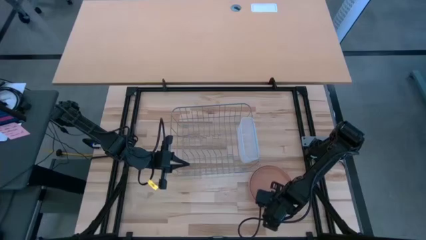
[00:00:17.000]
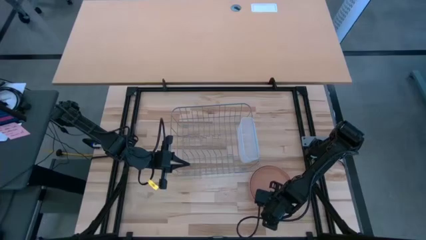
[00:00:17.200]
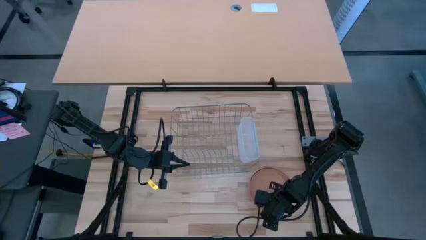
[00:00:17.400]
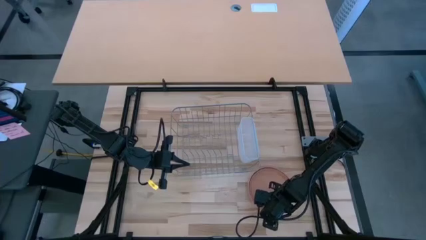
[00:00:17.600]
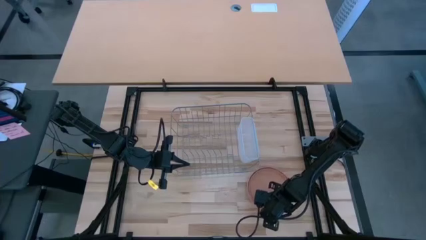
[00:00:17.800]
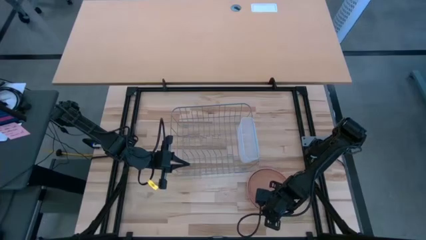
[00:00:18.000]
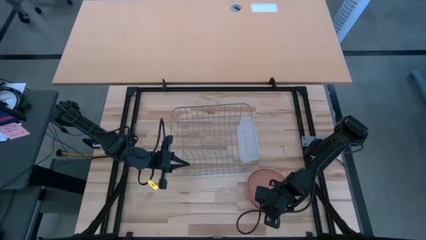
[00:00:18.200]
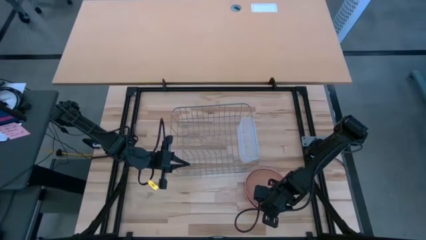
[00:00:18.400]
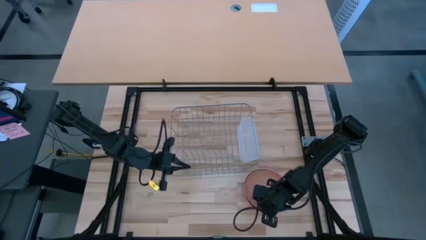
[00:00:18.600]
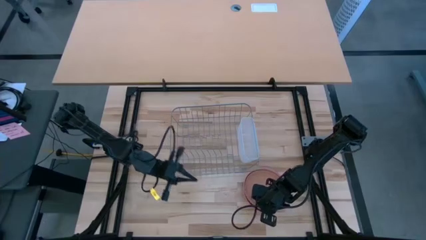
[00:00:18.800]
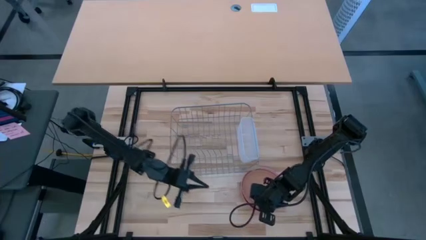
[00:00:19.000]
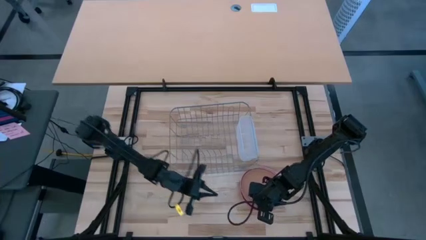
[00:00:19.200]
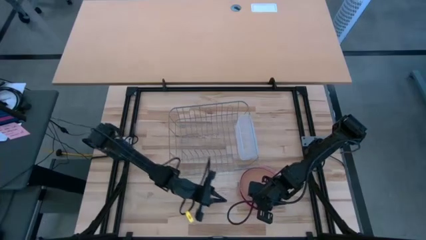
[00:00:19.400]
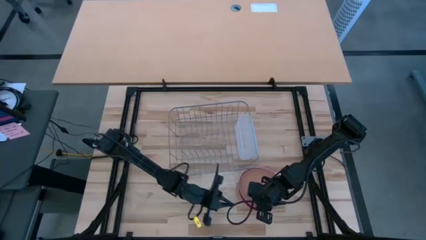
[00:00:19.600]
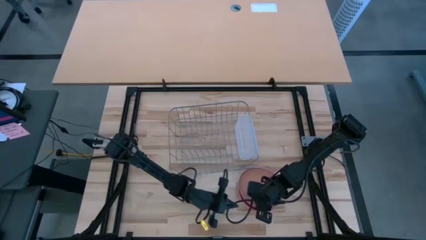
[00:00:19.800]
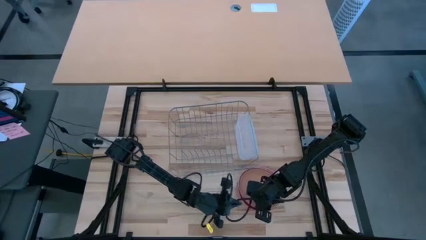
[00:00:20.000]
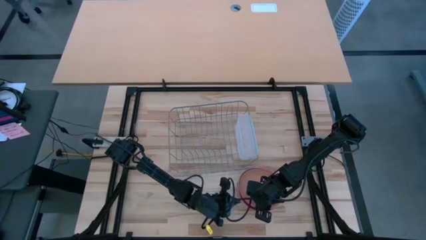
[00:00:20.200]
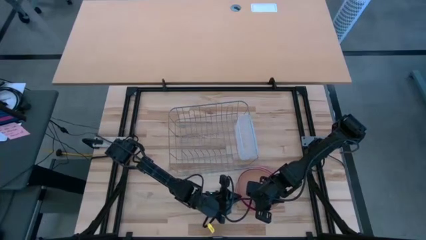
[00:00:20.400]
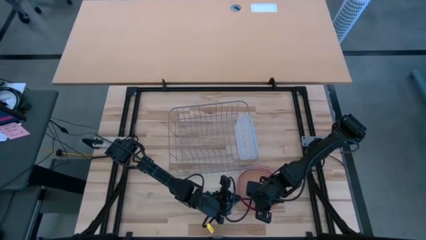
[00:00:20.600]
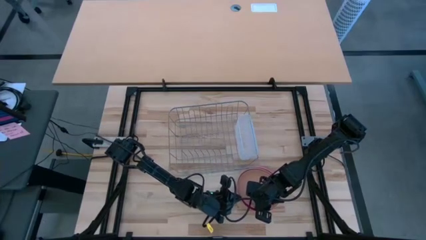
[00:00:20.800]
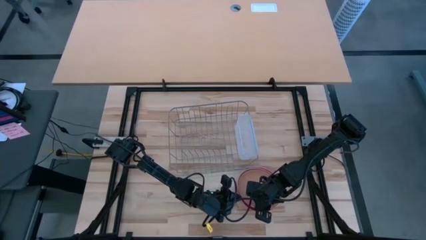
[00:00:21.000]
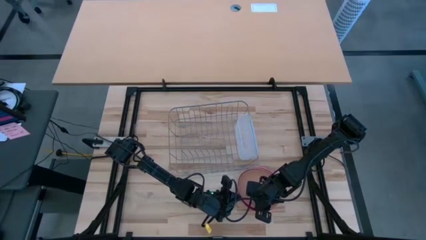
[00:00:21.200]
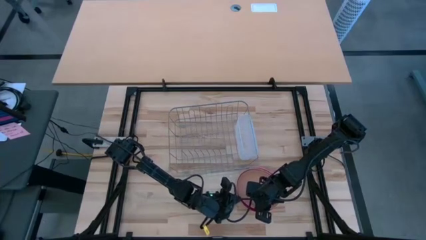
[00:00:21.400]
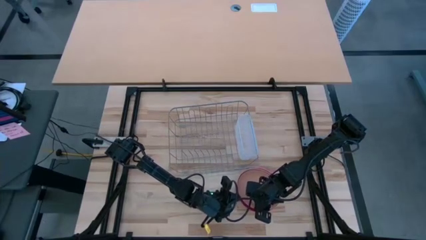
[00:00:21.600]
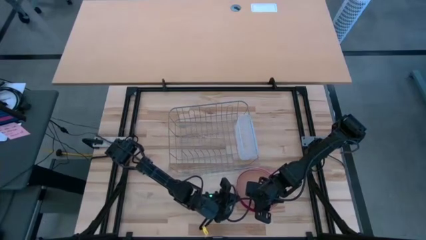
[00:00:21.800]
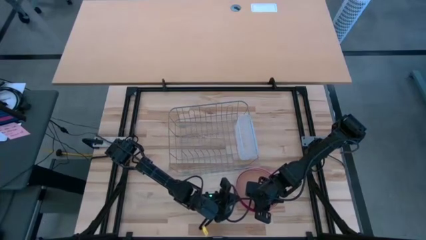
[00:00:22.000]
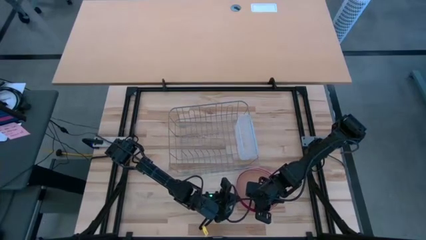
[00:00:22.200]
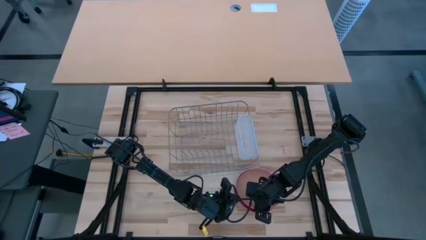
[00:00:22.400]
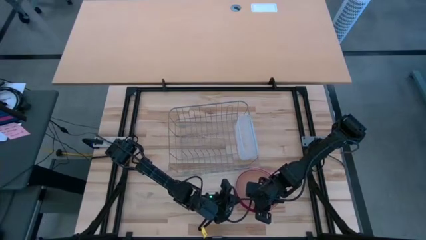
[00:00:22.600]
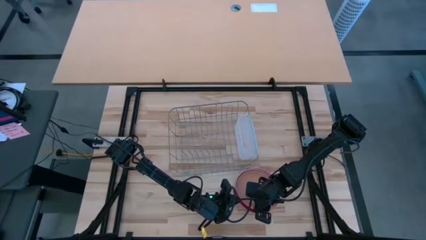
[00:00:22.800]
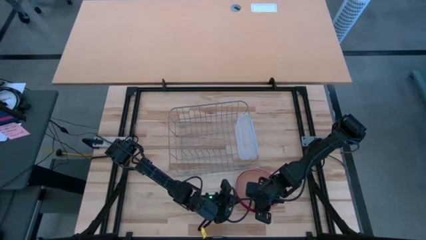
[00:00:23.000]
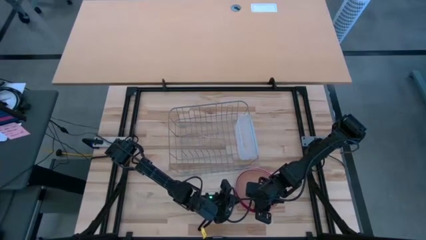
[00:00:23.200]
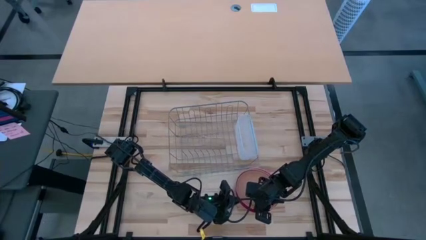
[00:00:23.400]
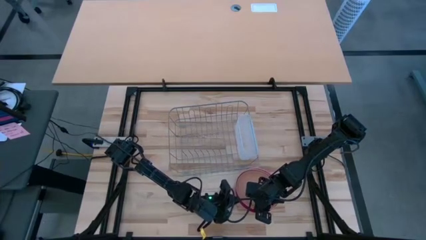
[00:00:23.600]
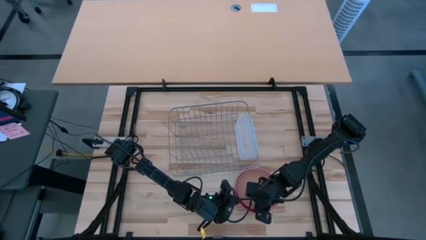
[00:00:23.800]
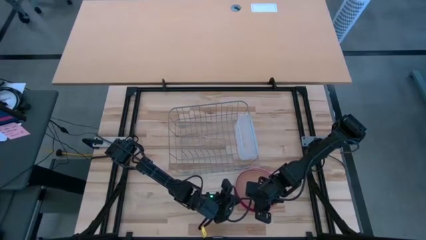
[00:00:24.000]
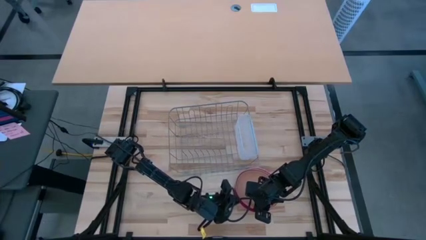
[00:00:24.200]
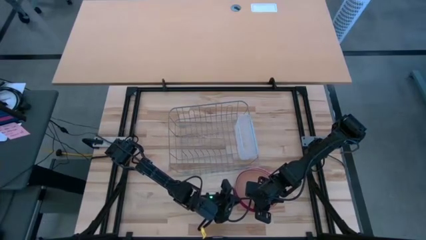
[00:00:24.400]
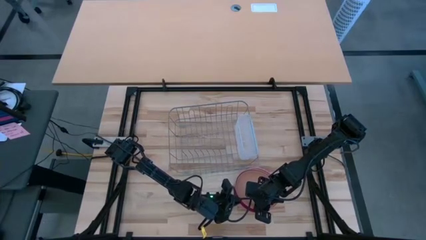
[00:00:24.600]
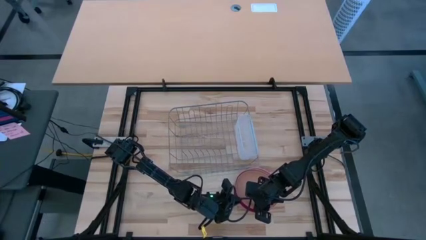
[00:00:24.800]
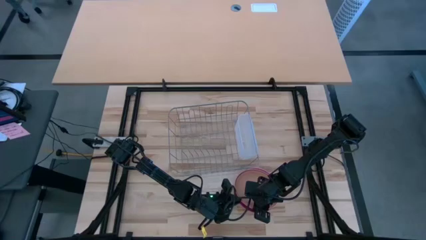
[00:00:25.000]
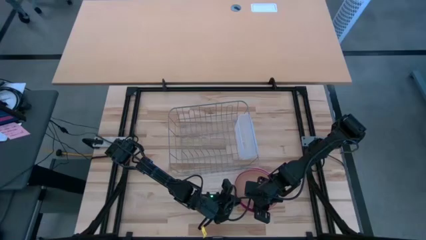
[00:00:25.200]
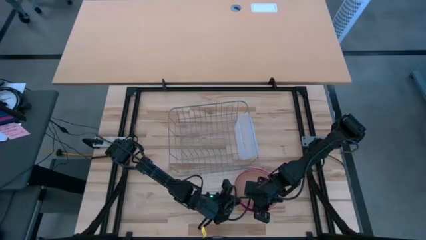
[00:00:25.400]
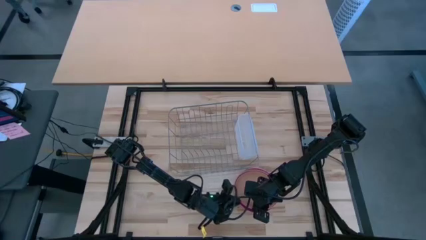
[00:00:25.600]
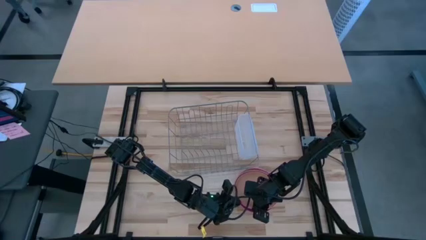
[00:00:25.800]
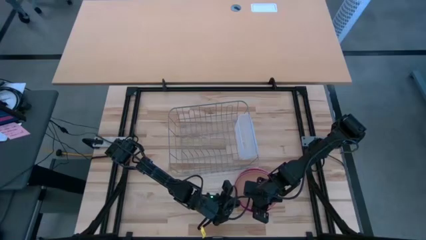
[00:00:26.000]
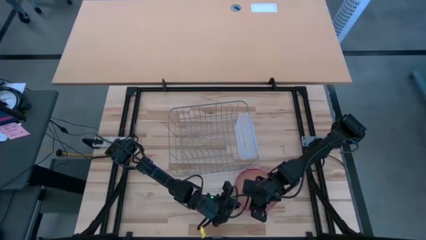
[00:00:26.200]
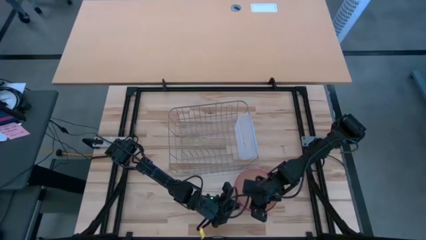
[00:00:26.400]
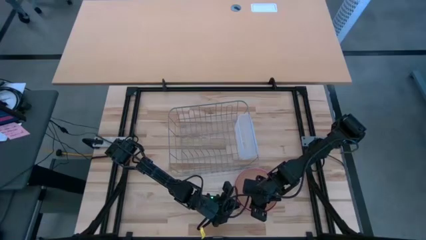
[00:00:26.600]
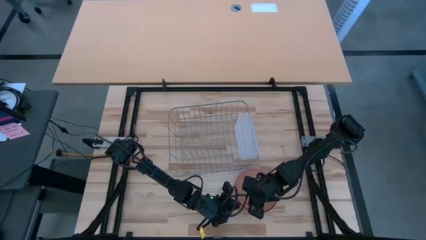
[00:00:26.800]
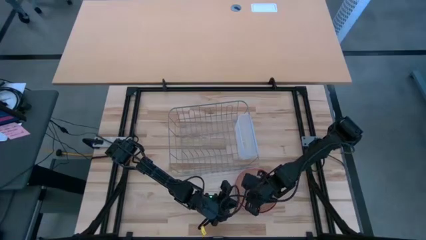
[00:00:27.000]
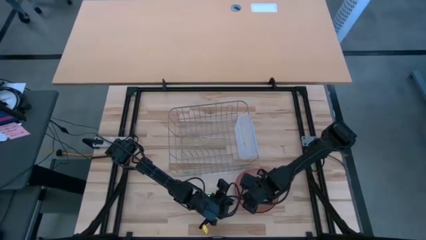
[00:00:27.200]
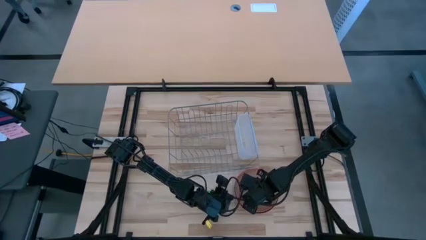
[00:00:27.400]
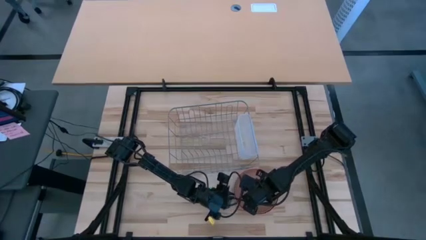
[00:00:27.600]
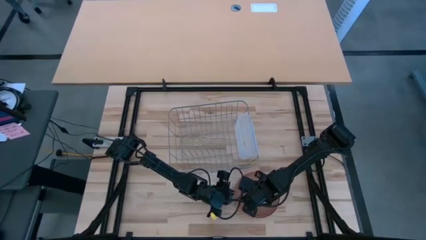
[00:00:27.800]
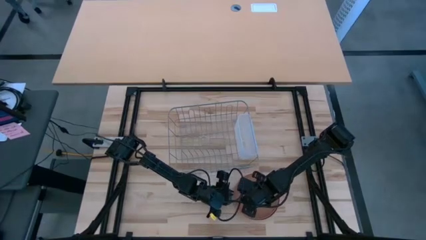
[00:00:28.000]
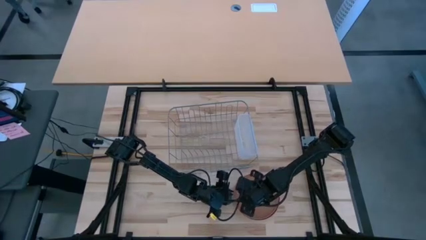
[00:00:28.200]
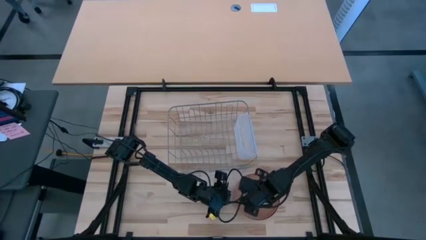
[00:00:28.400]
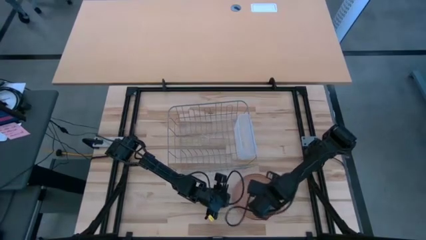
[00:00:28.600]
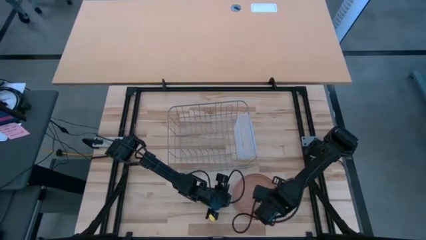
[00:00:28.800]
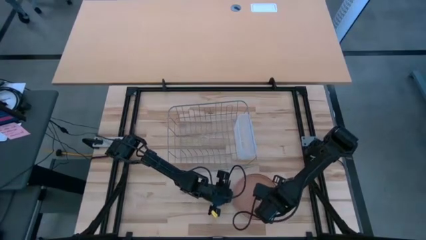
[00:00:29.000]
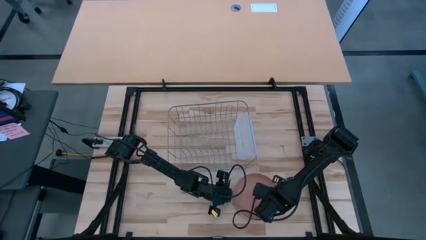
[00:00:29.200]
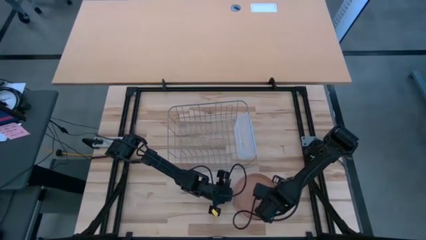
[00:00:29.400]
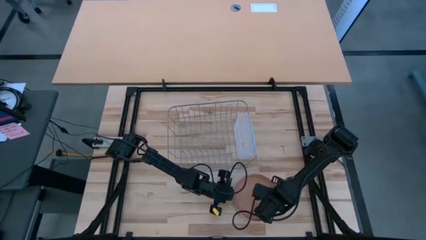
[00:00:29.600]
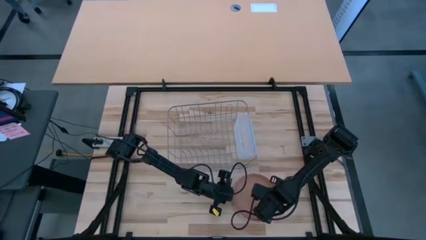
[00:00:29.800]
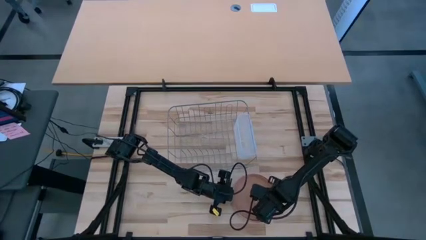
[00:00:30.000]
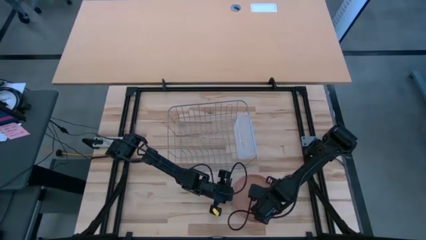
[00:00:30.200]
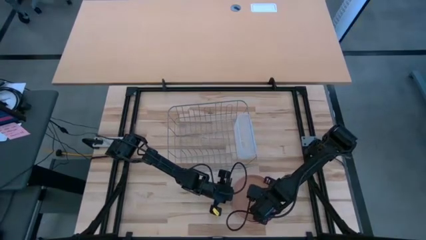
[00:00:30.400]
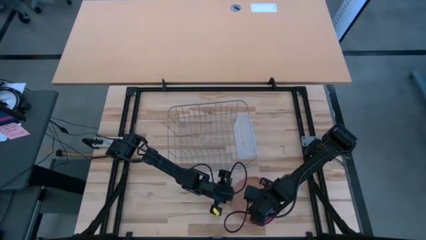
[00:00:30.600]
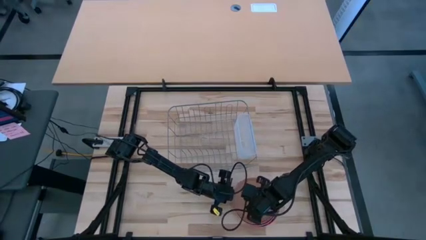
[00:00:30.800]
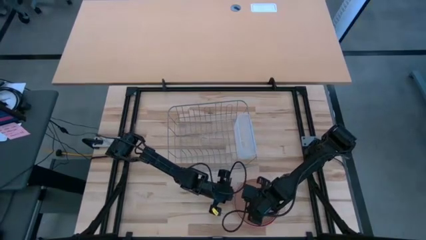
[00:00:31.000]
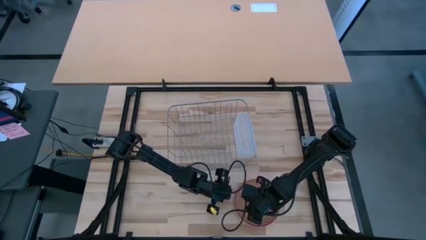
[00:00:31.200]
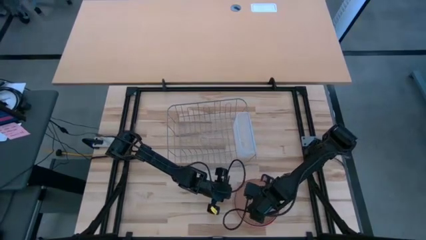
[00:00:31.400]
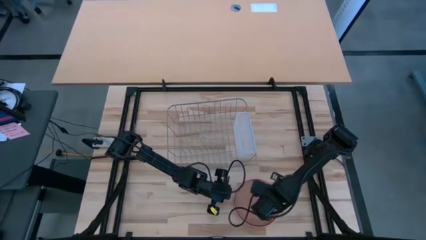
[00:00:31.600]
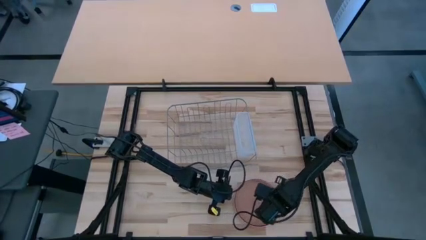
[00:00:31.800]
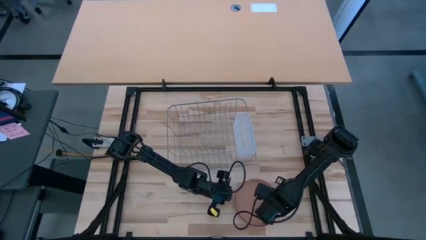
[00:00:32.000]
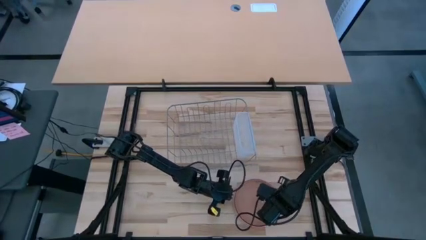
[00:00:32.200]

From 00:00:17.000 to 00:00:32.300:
Task: Sort dishes
Put the brown plate in the dish rack
